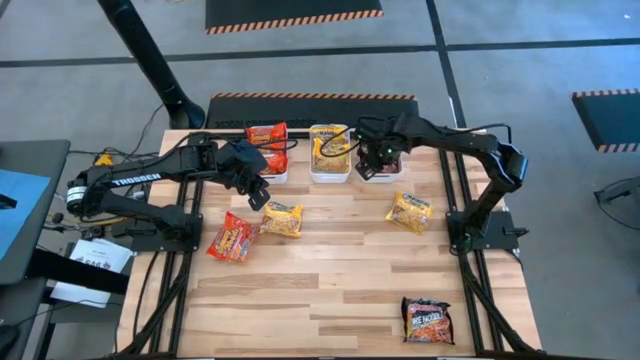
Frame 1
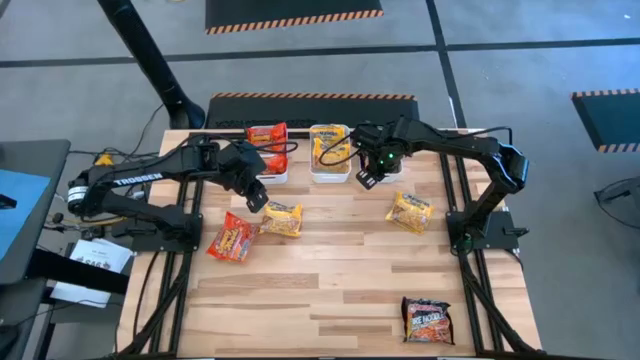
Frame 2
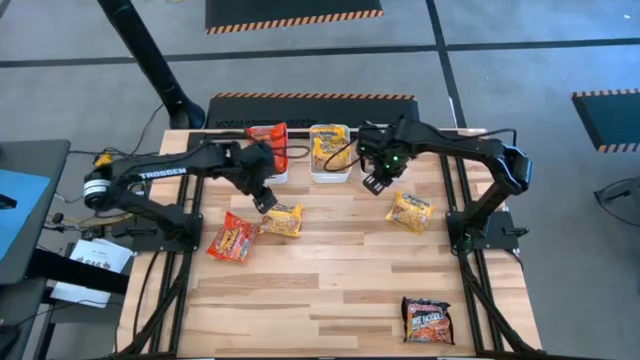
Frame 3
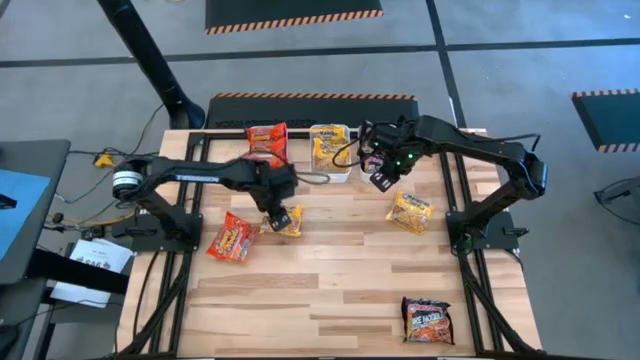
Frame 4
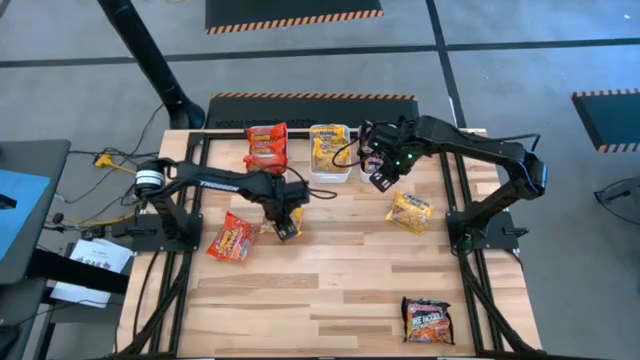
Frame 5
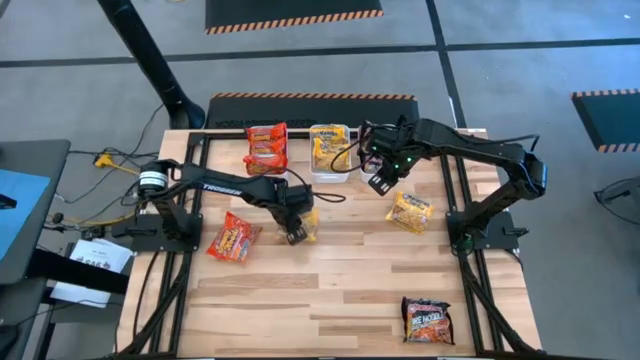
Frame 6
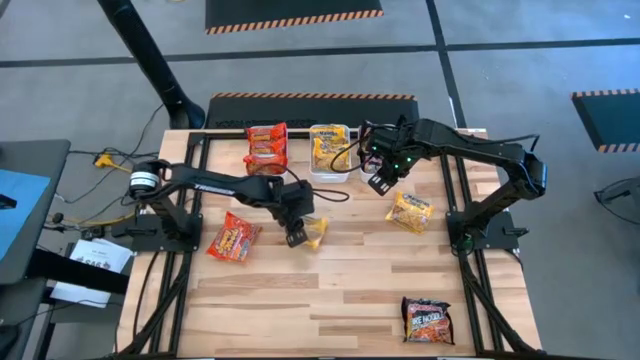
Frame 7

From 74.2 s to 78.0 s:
Task: Sort Maruchan noodles
Put the yellow noodle pack into the middle white bin

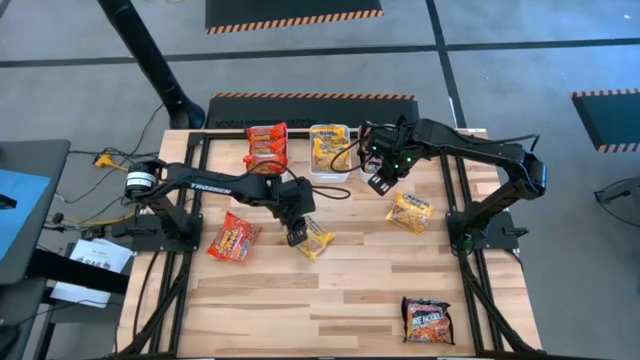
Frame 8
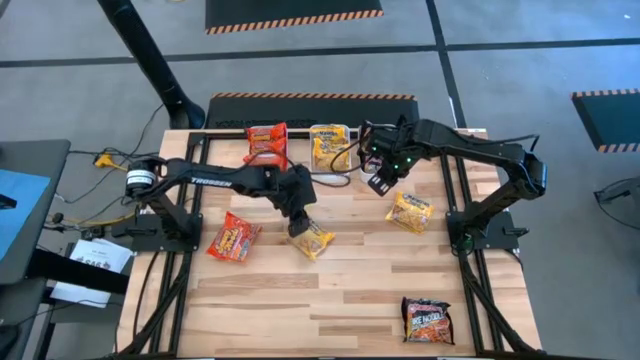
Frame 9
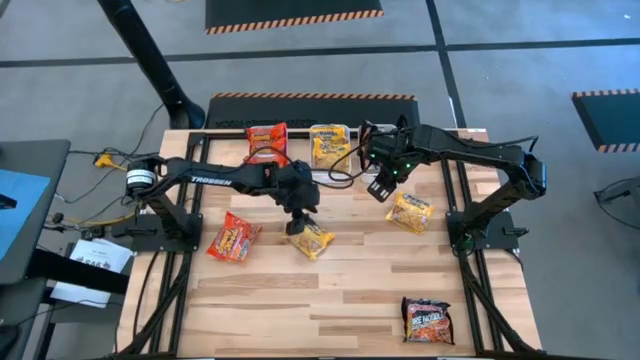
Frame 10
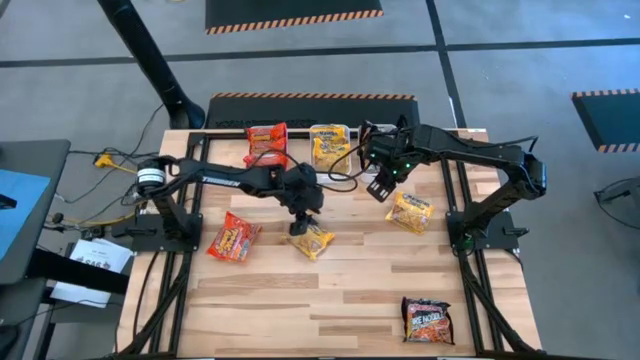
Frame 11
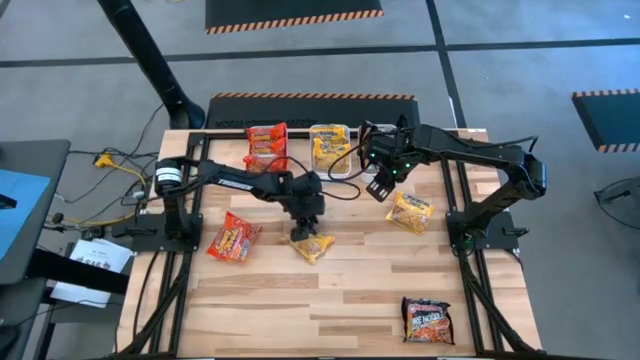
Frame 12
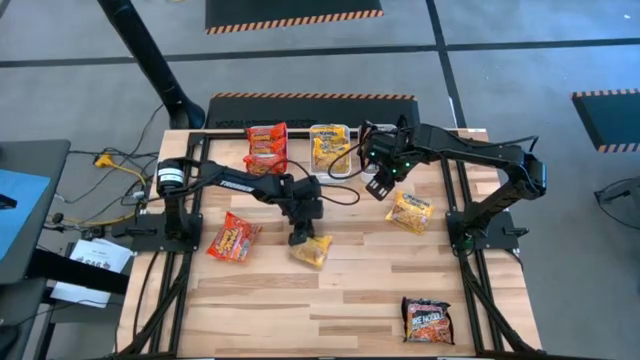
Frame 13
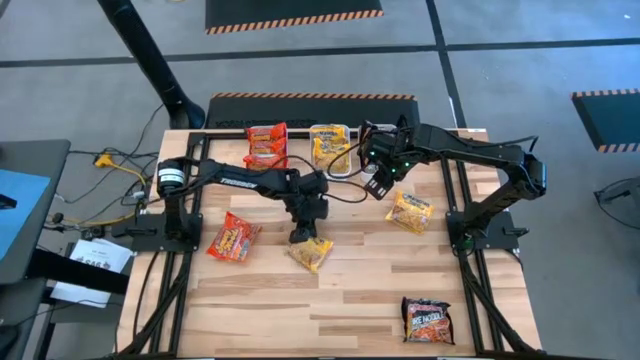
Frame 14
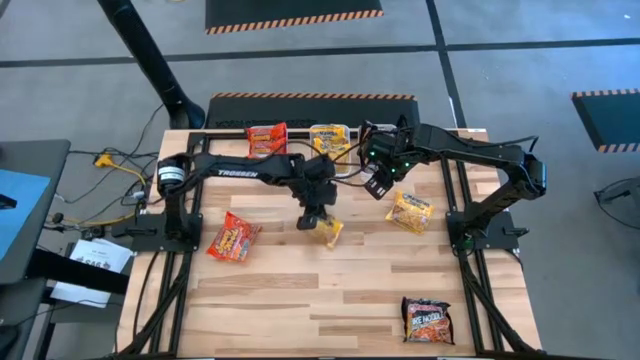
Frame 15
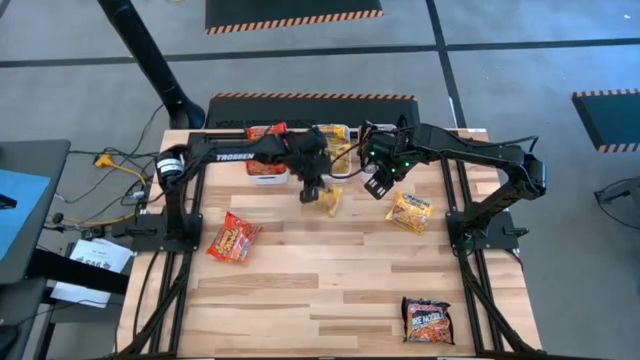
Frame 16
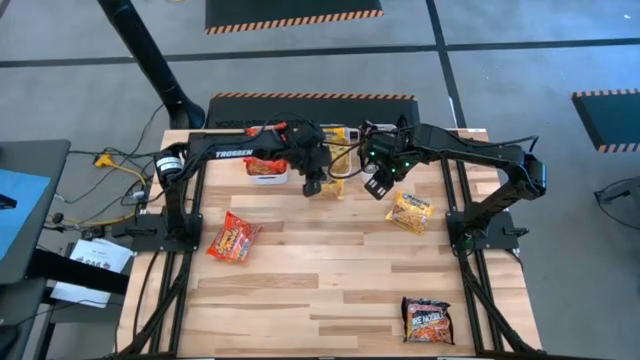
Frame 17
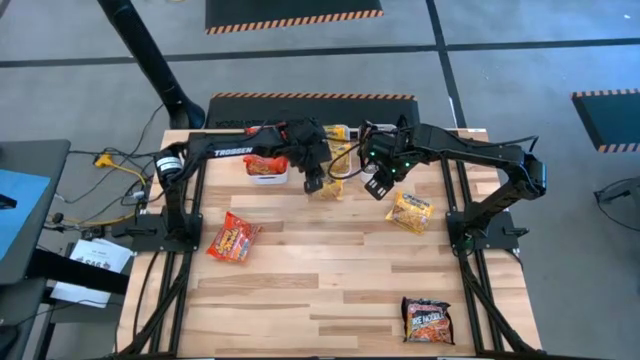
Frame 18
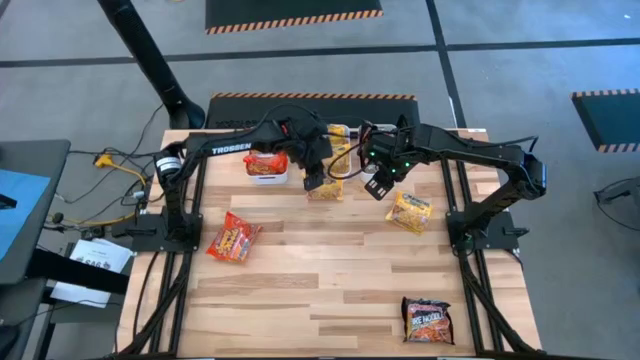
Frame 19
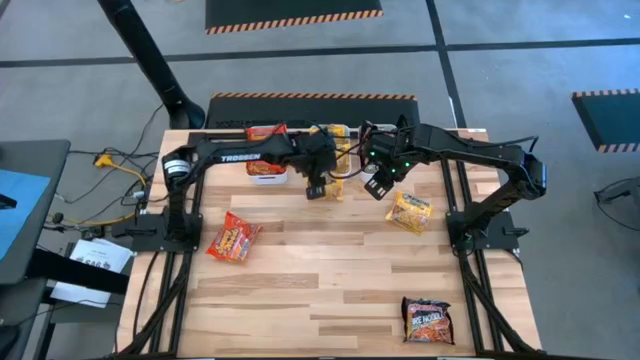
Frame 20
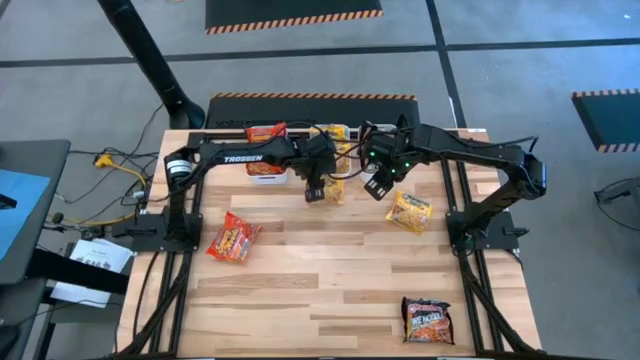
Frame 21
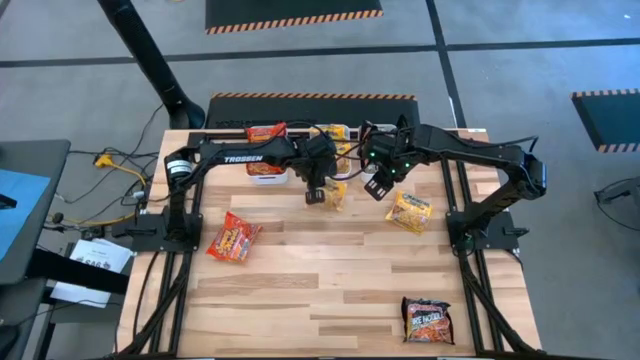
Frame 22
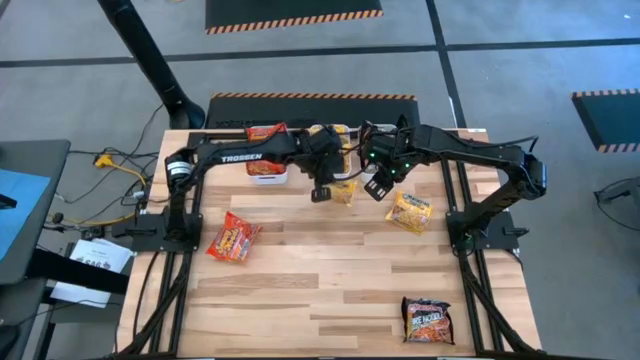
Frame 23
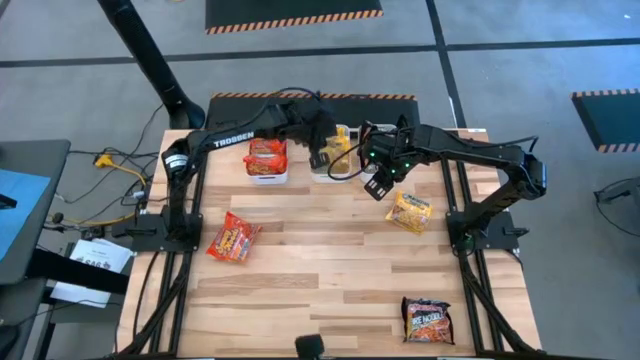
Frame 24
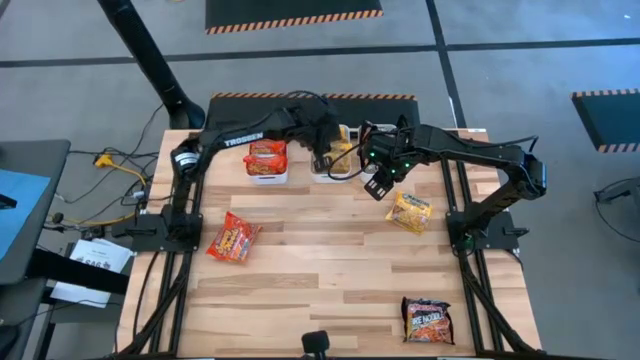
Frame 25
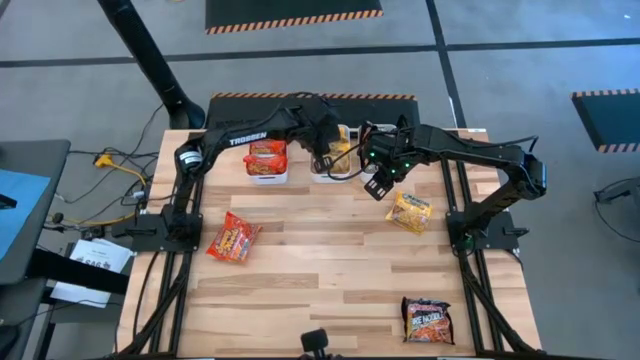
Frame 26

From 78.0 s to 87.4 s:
Put the yellow noodle pack into the middle white bin

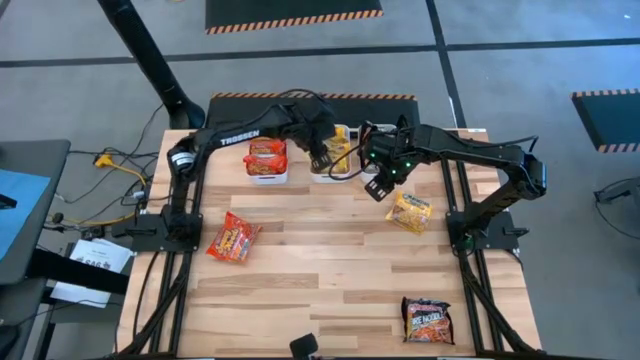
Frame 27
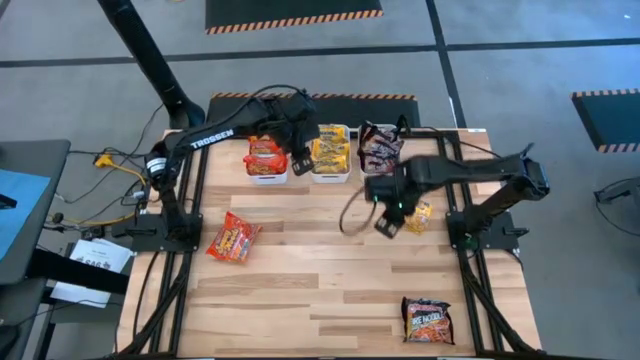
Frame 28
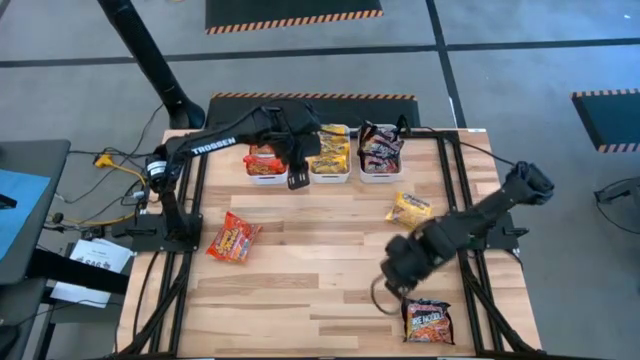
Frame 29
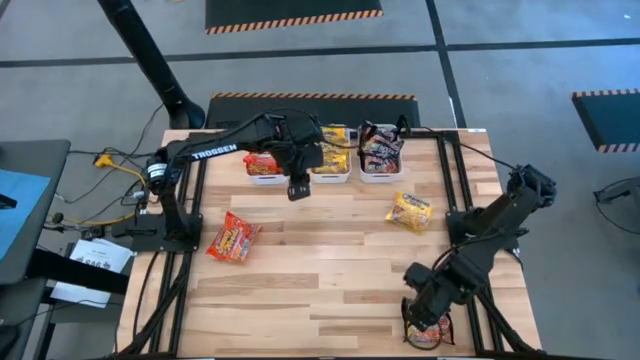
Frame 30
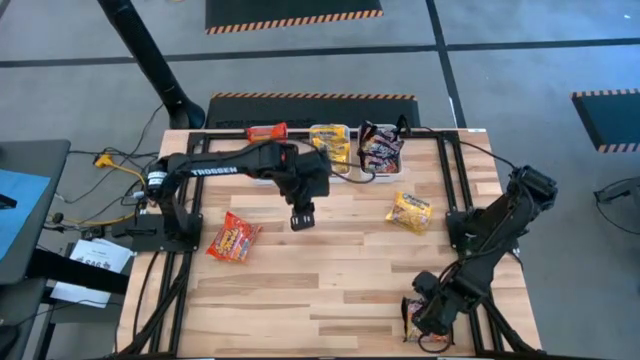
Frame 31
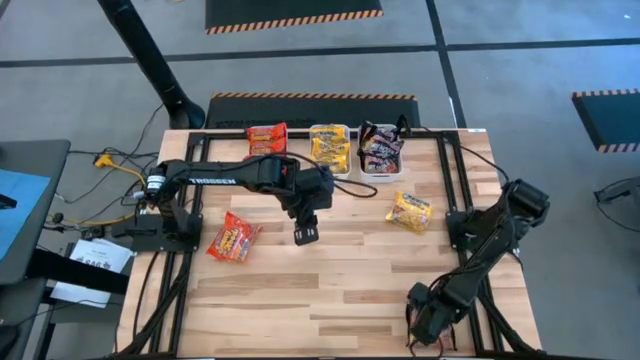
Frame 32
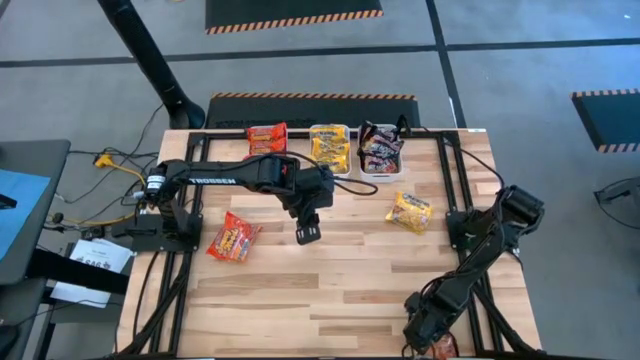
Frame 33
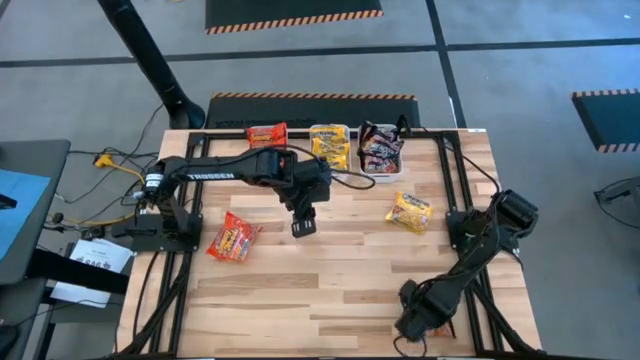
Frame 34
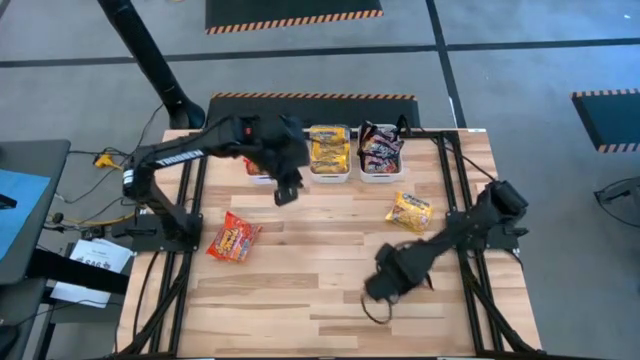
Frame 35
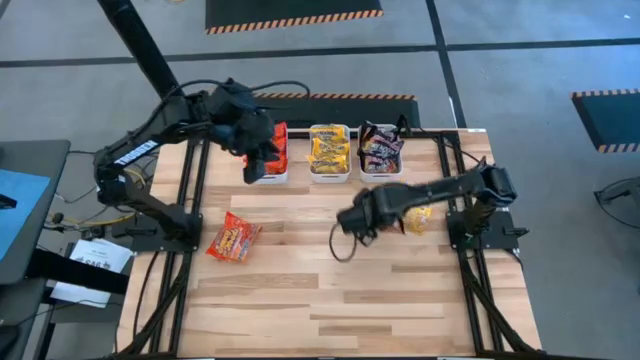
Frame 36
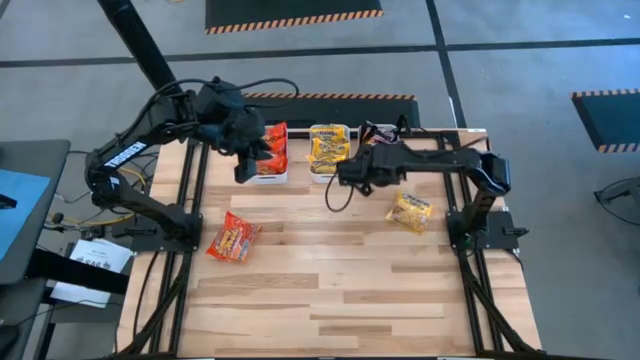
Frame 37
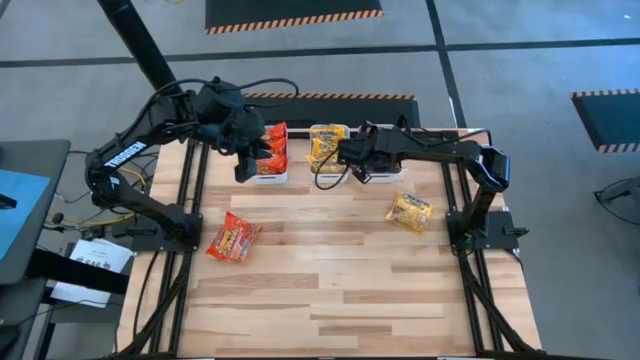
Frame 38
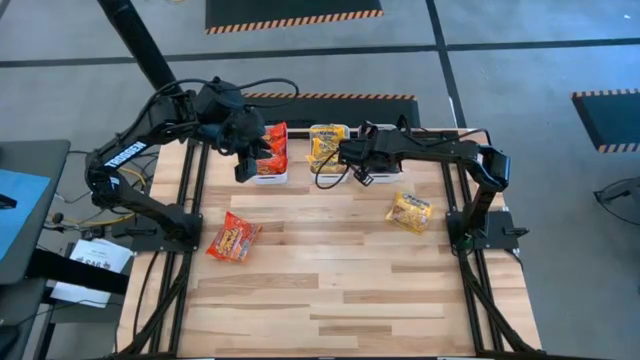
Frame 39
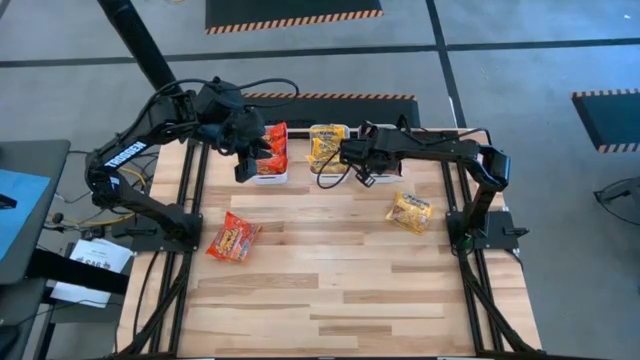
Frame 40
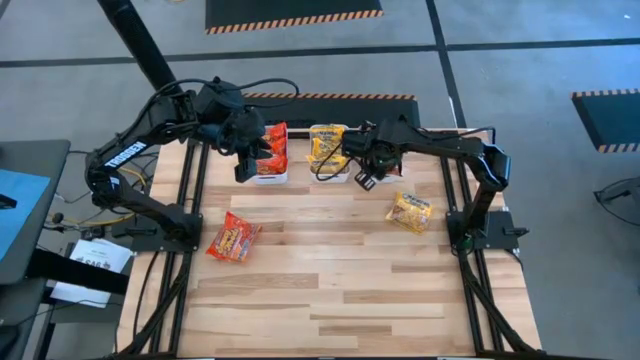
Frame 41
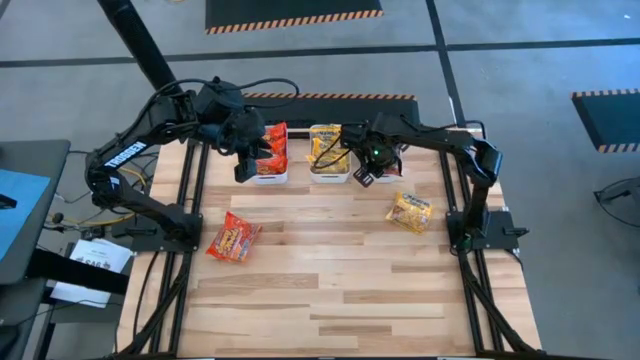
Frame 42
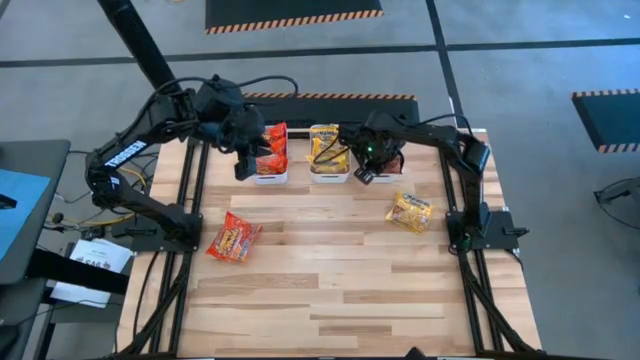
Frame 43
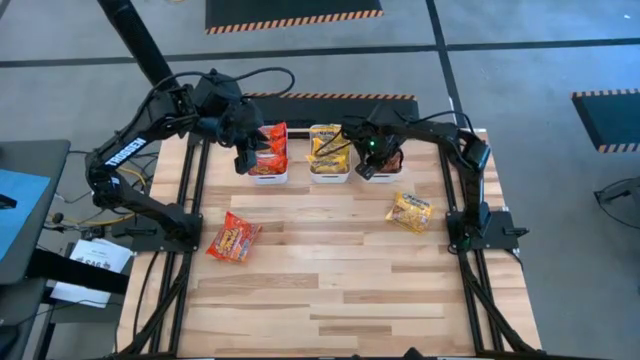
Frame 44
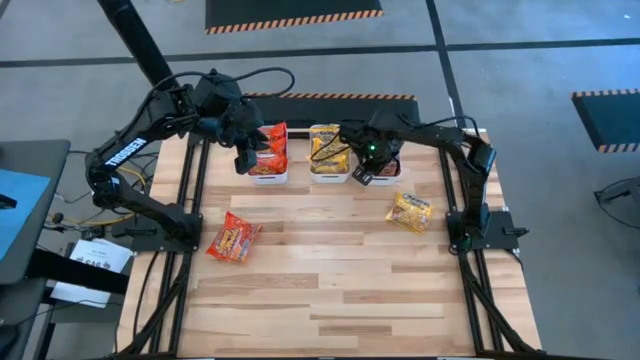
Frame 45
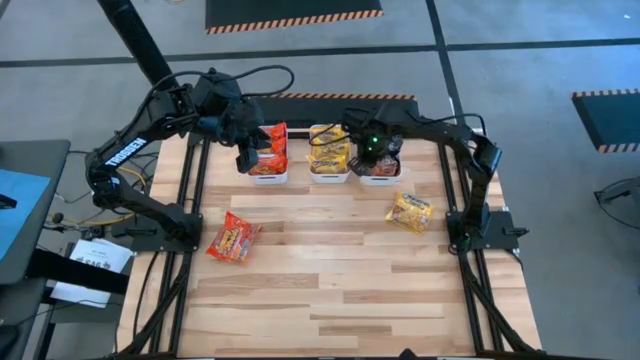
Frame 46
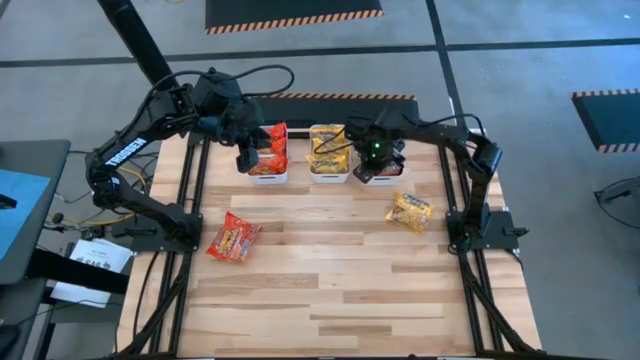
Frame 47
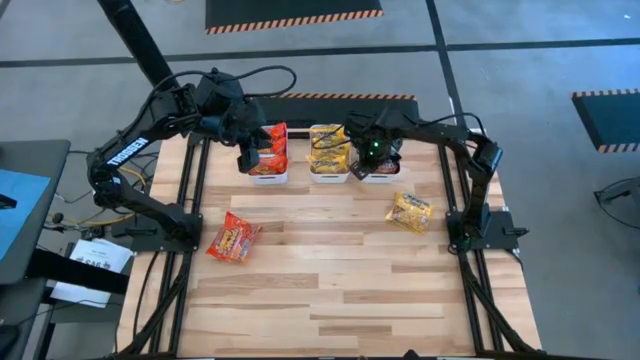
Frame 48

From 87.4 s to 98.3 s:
Put the black noodle pack into the right white bin
